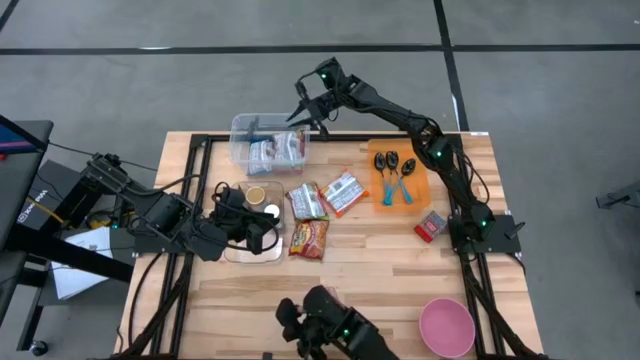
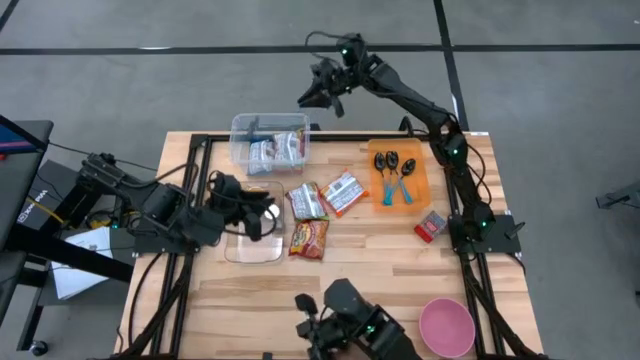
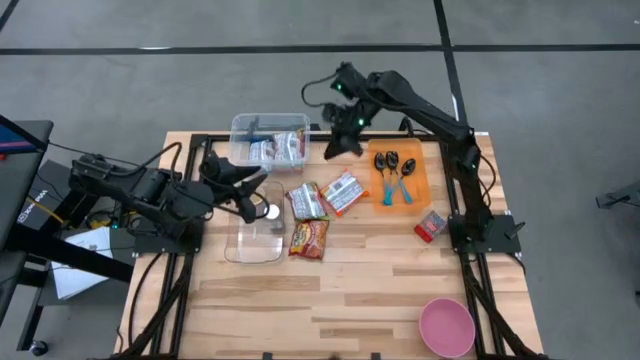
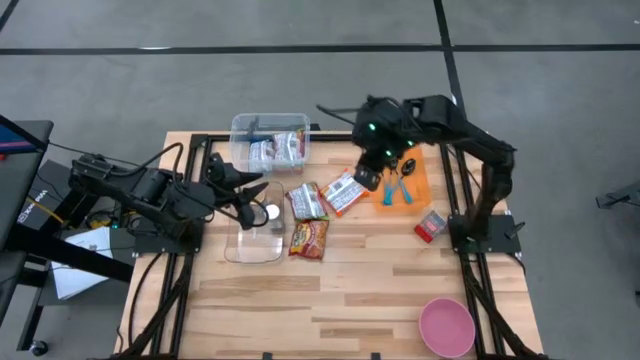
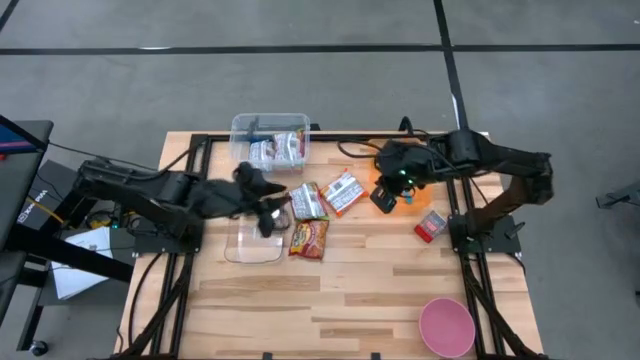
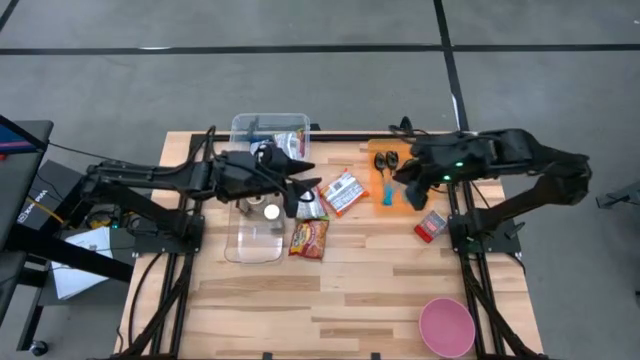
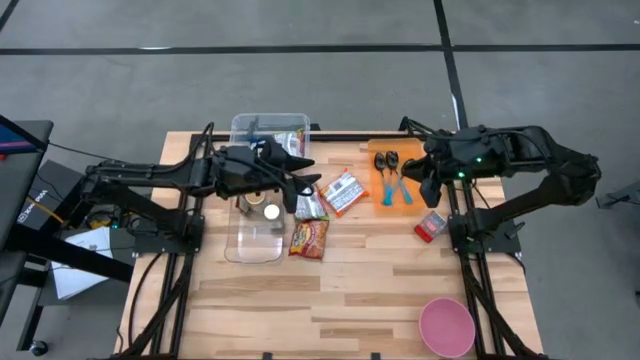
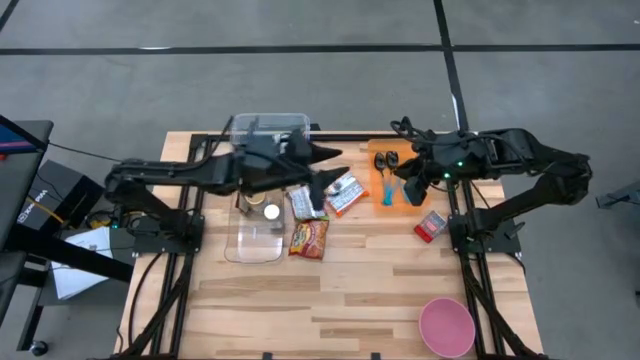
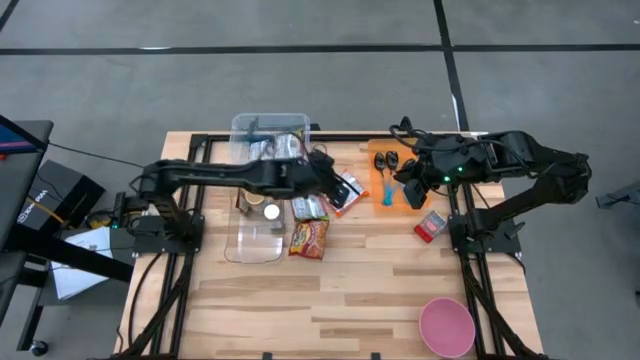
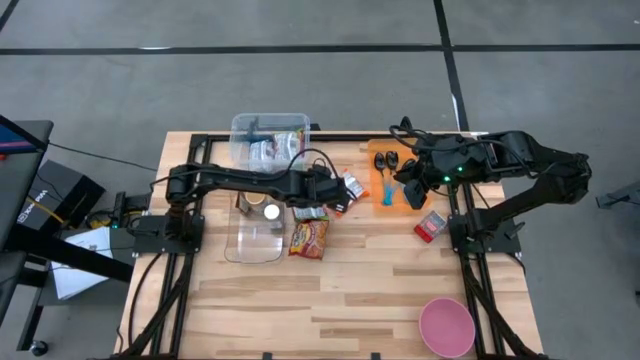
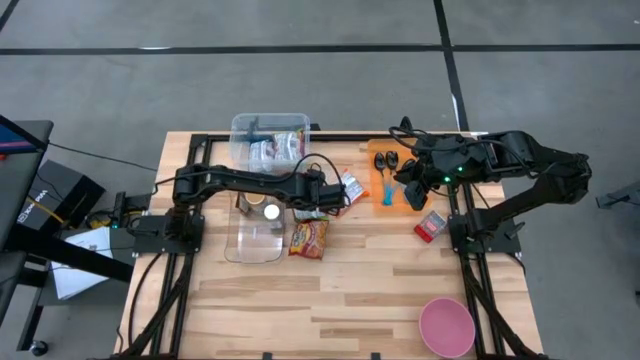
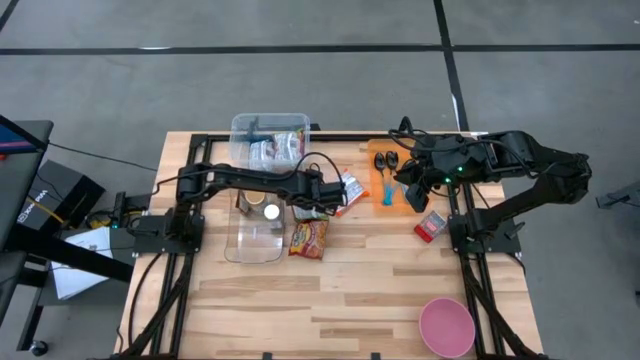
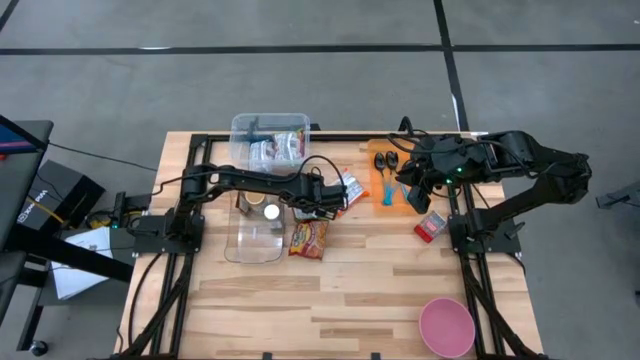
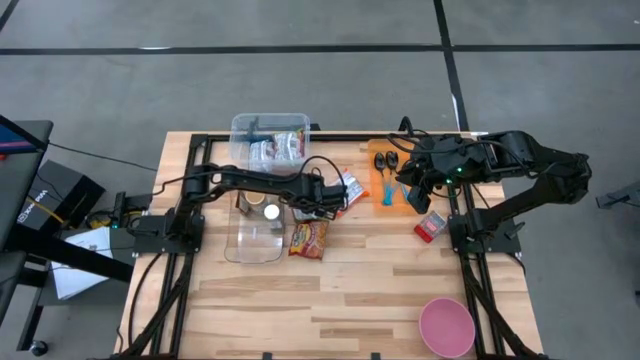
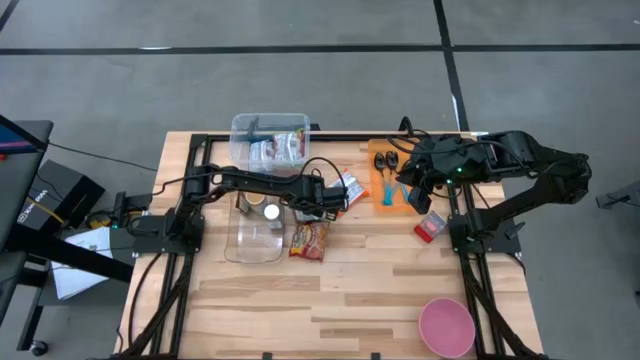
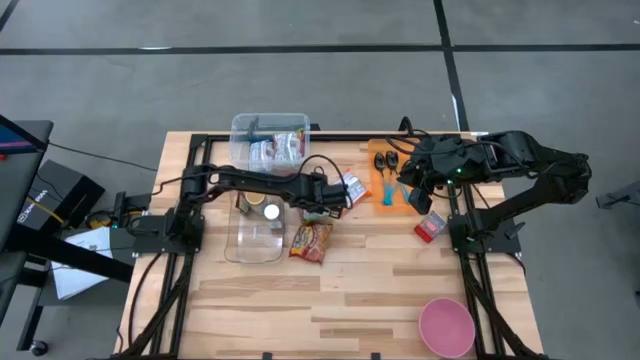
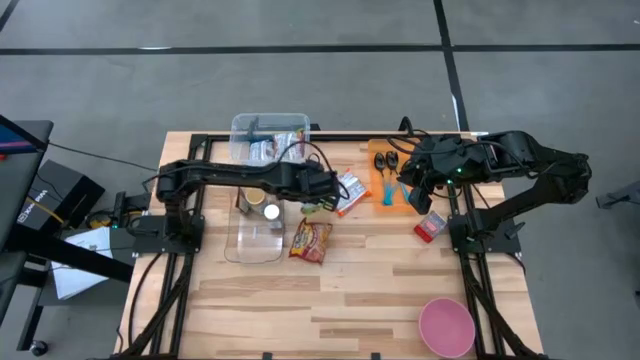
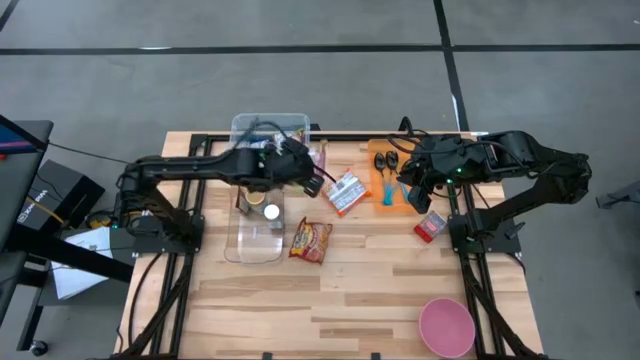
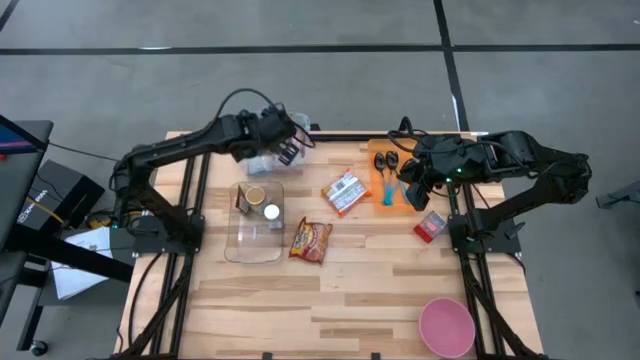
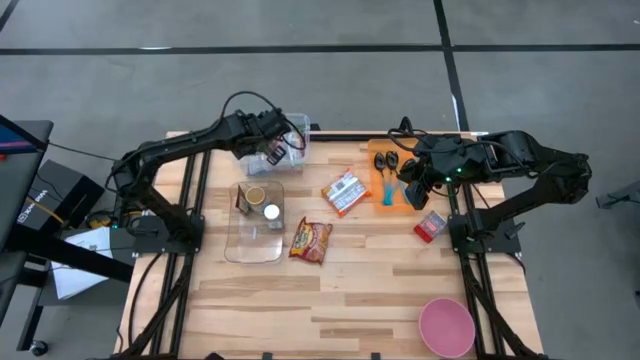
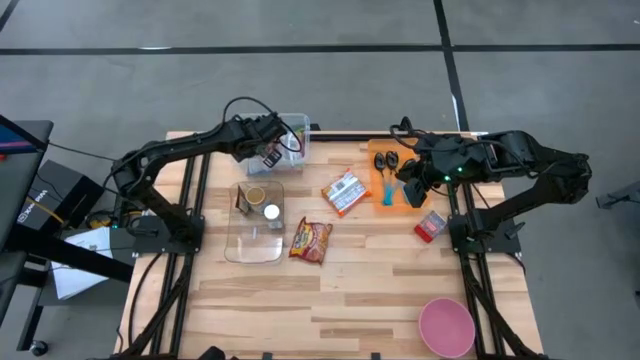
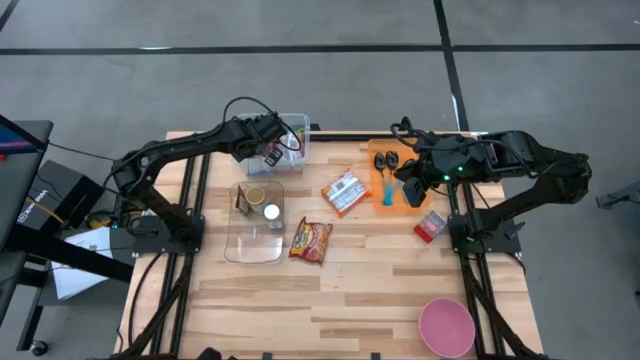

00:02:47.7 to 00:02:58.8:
Task: Pick & Place Food Item
Put the green noodle pack into the transparent container

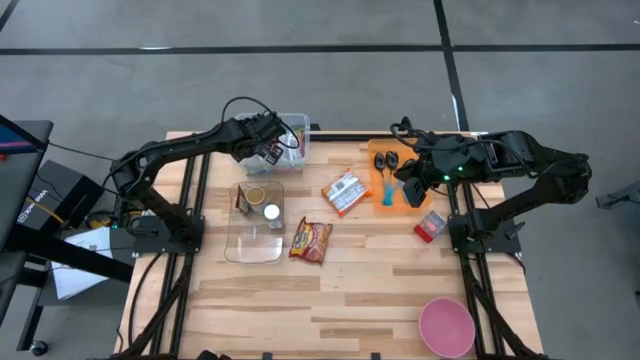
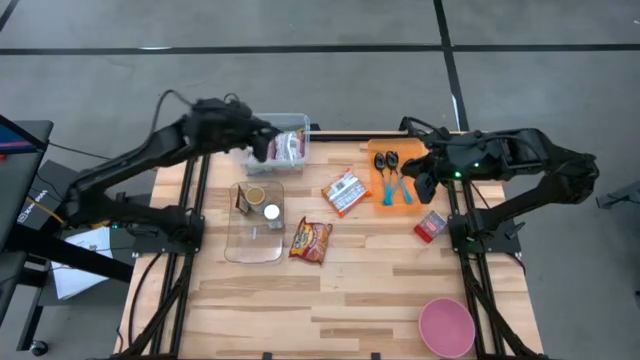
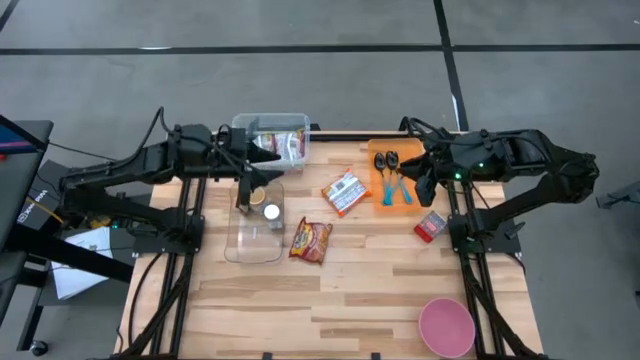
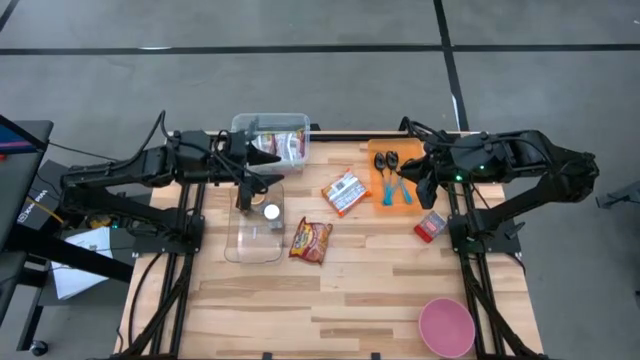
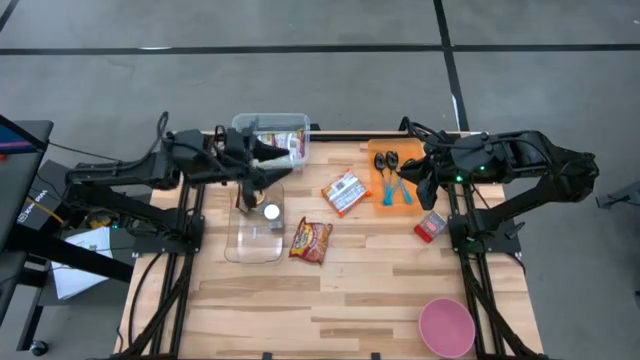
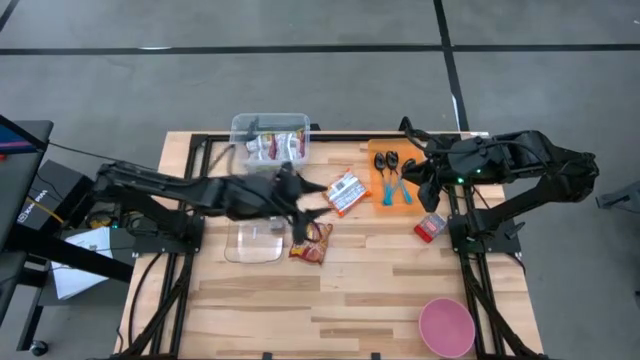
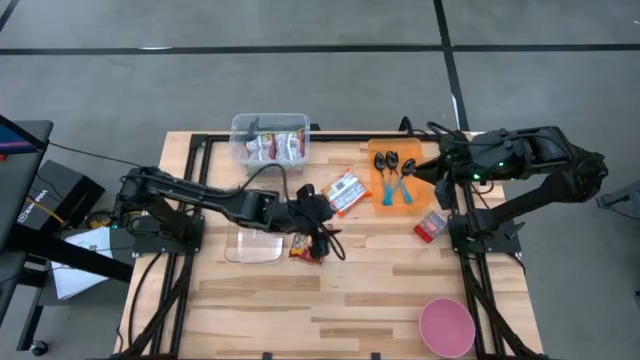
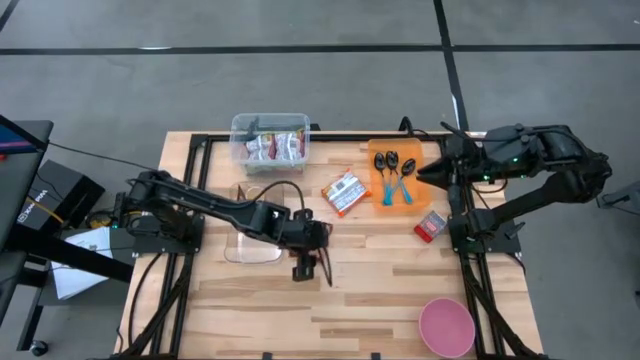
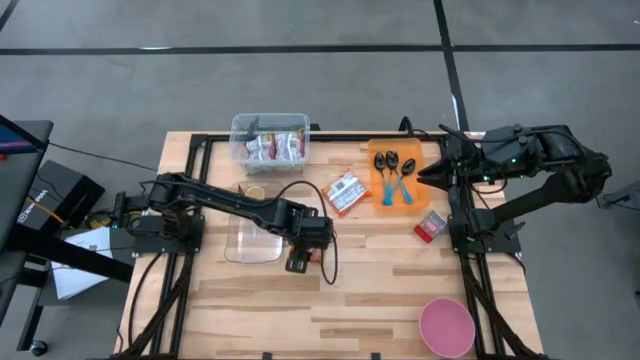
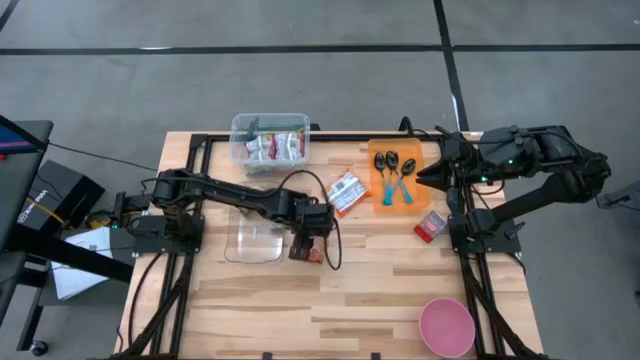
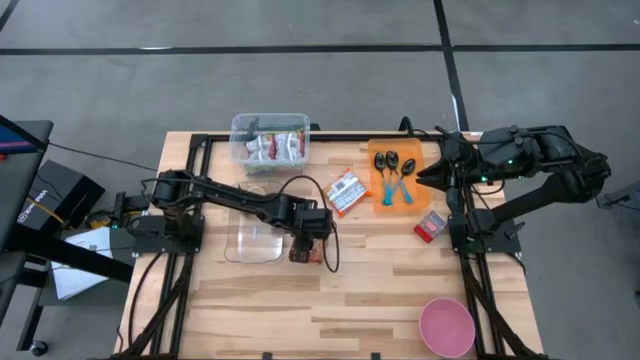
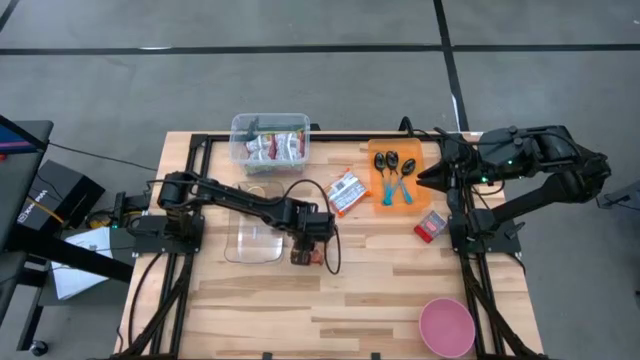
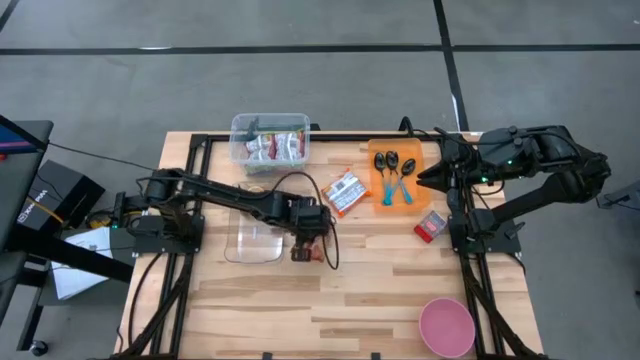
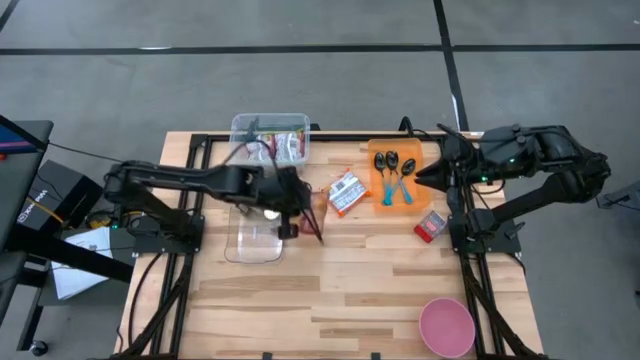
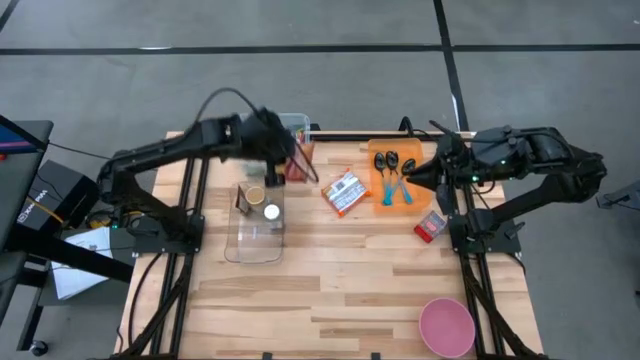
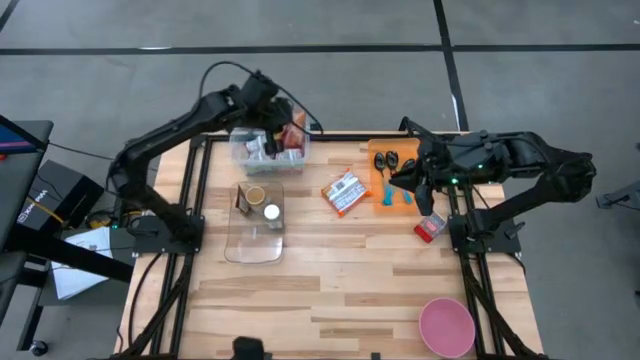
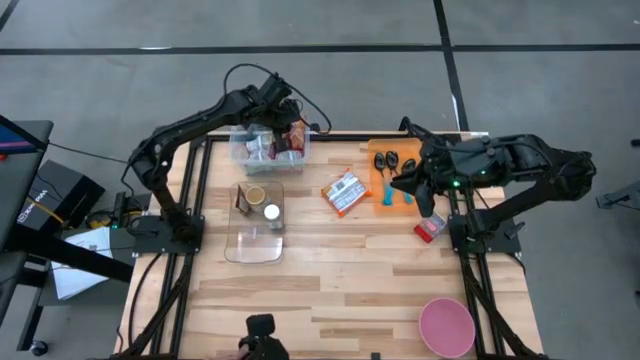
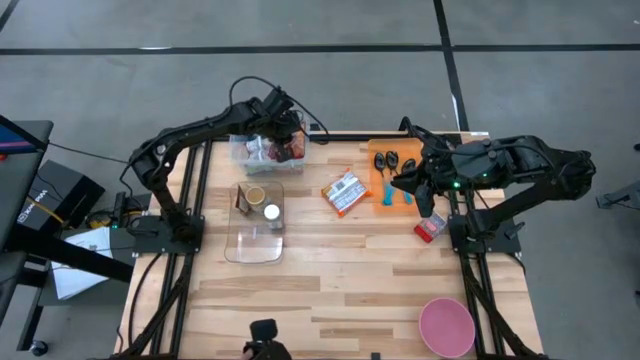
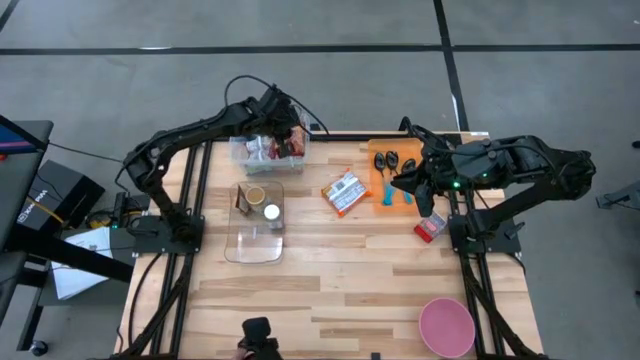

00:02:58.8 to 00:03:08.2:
Put the red noodle pack into the transparent container
